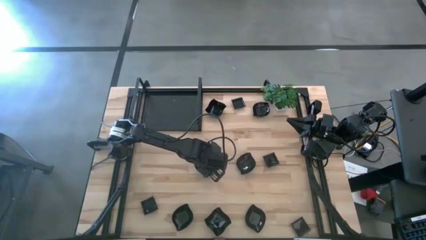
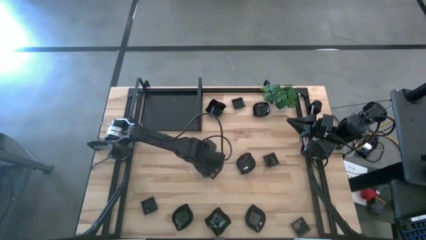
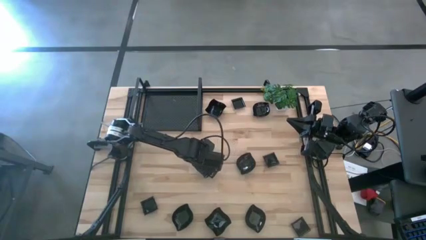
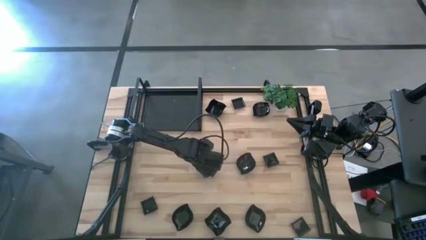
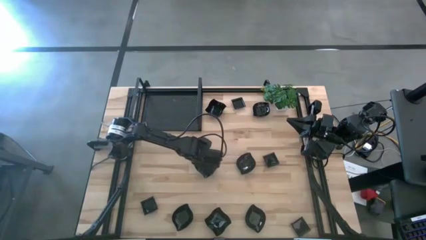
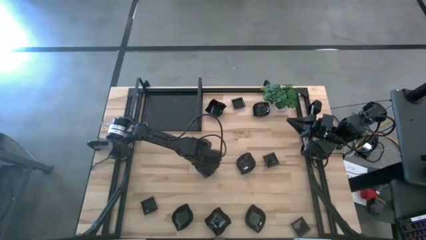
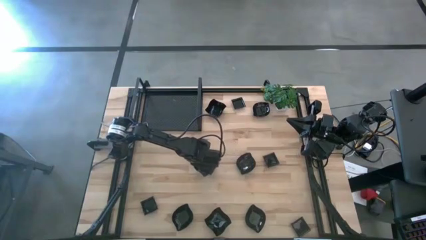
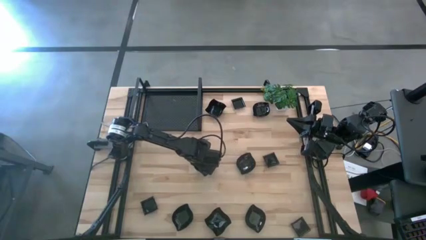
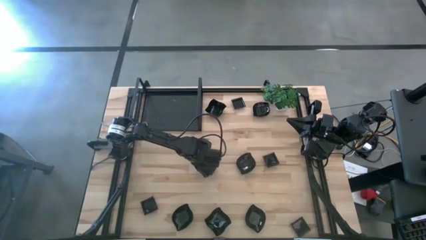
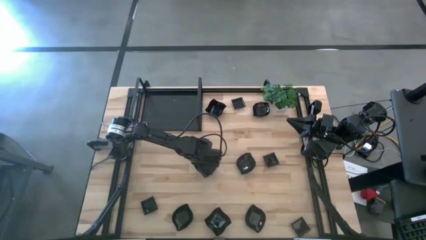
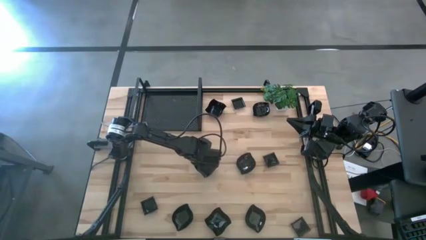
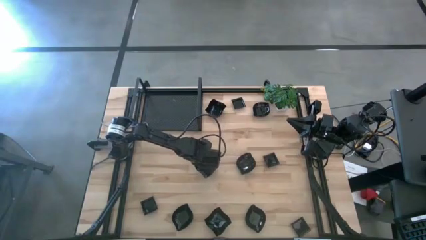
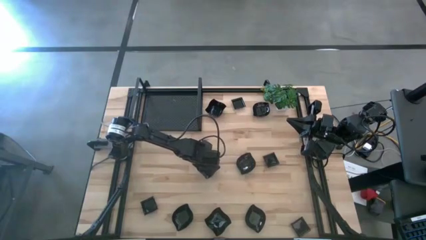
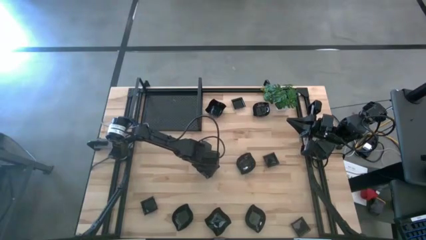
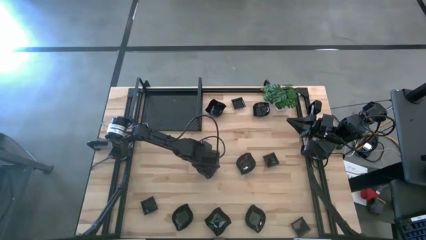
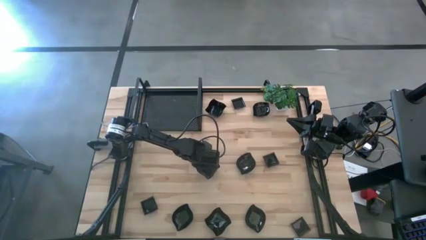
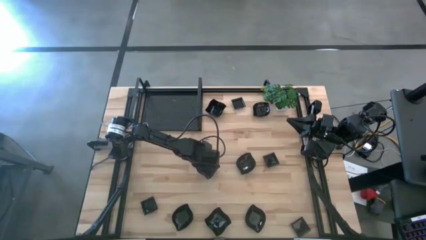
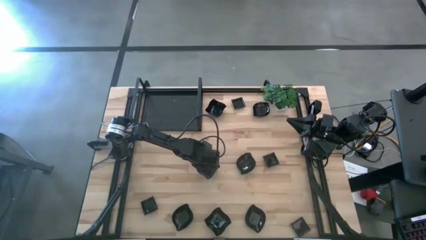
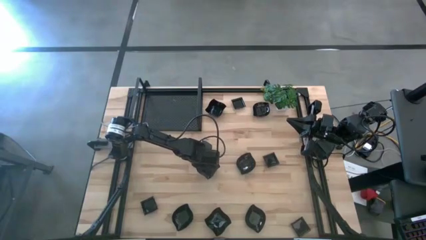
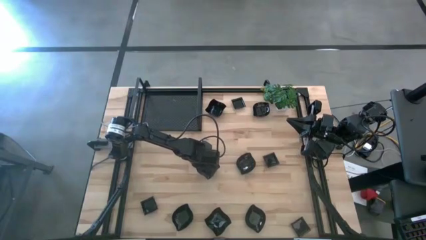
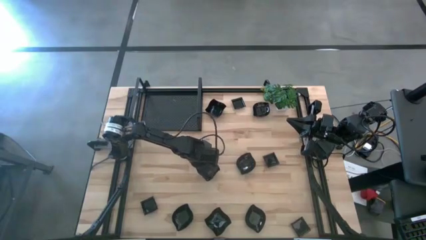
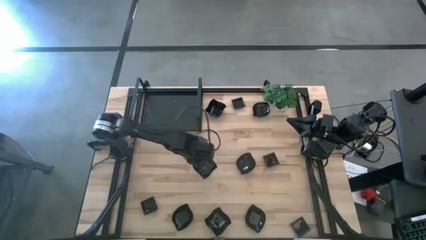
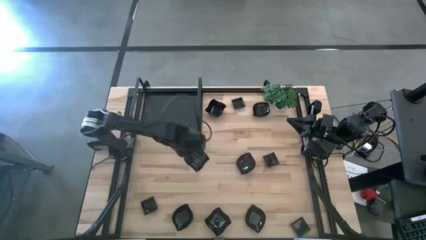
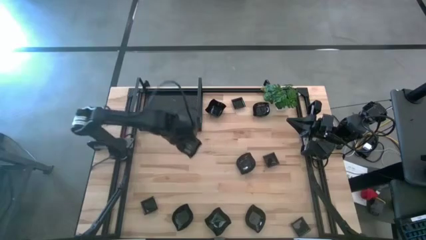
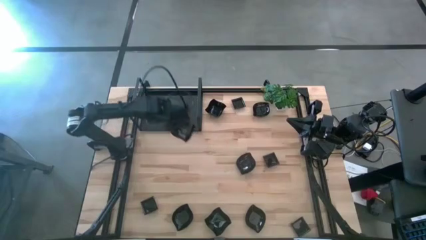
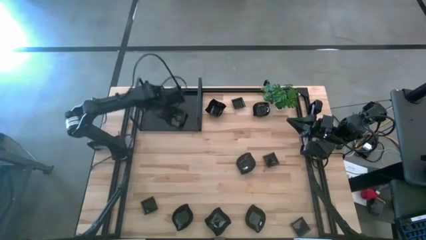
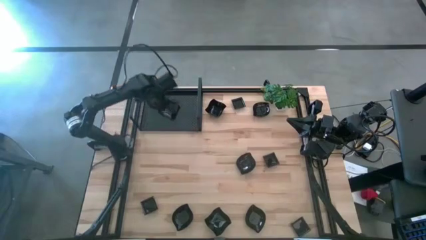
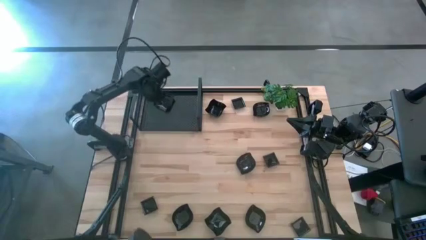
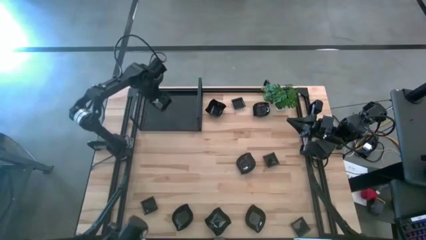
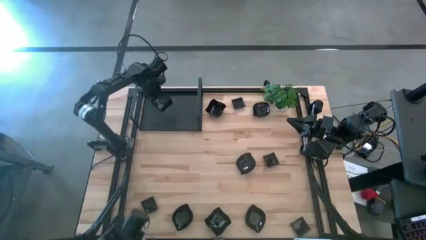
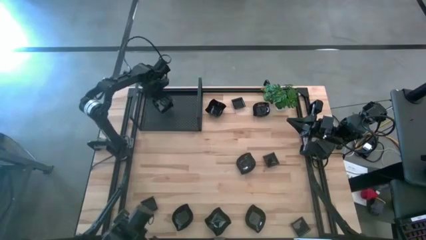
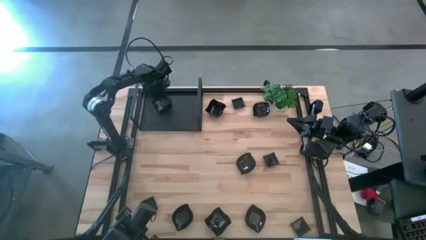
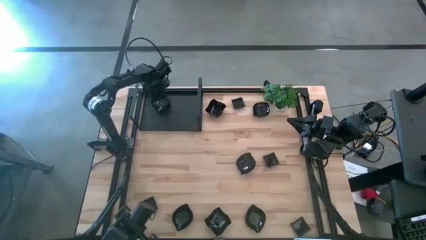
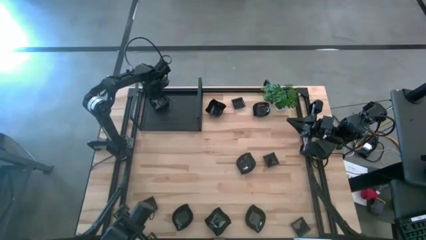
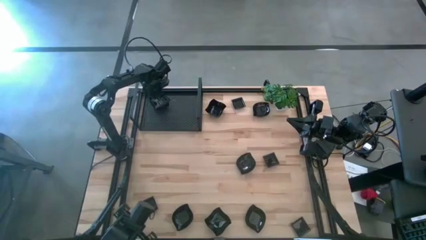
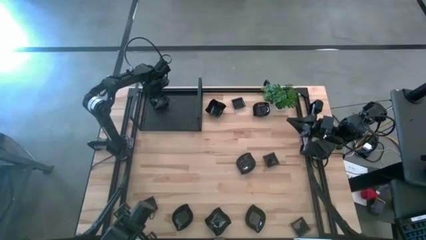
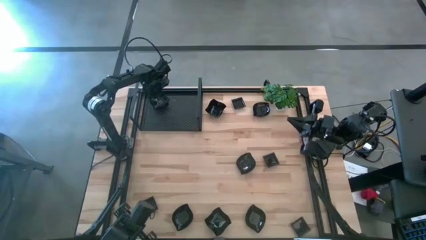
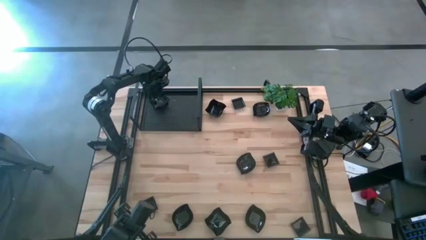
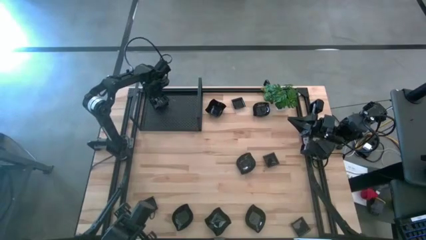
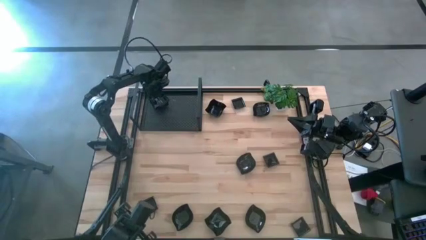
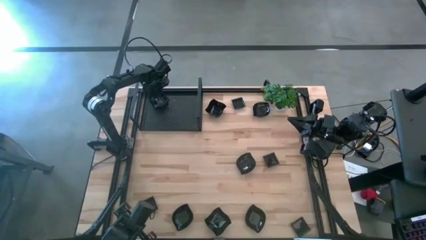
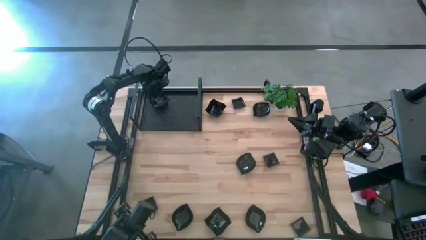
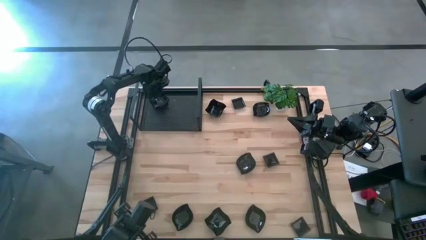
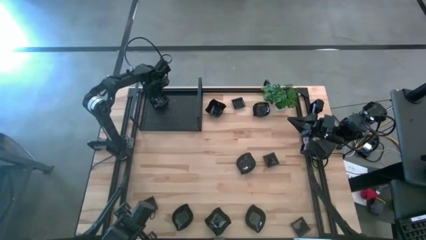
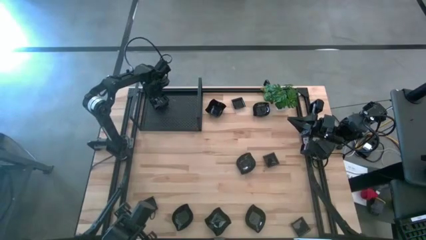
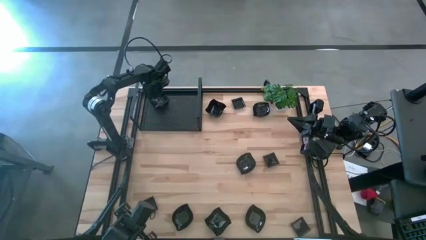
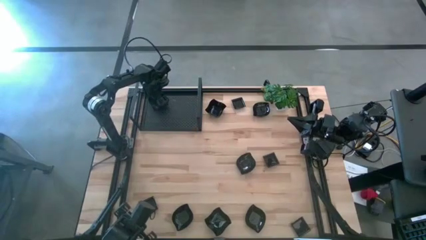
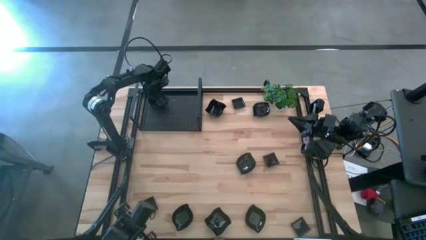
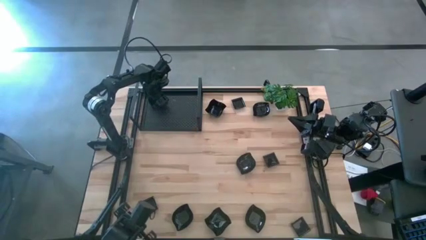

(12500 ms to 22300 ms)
Task: Pick & Place Mini shaped plates
Put the stacked black distorted square plates on the shelf

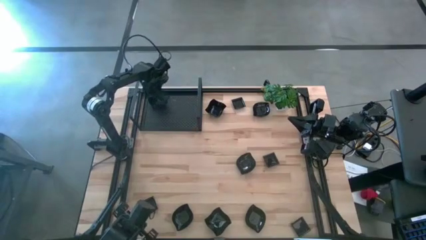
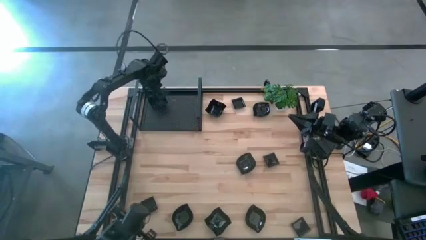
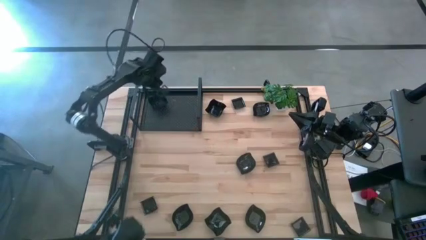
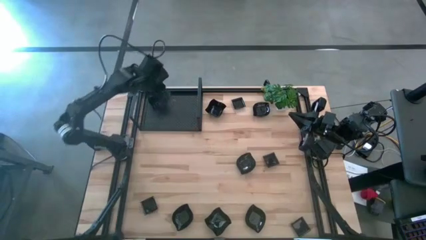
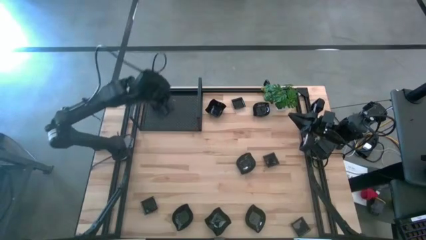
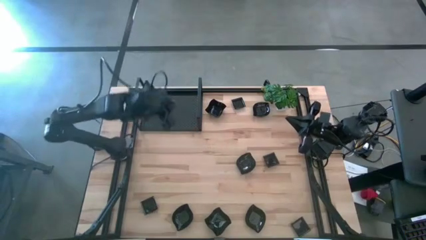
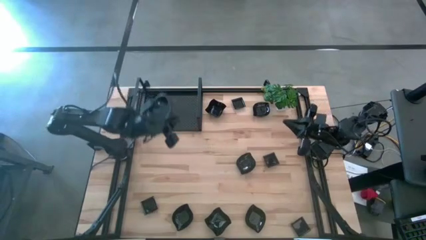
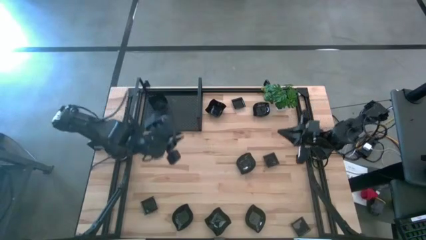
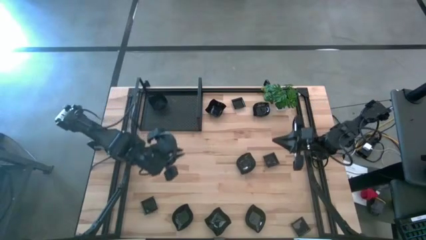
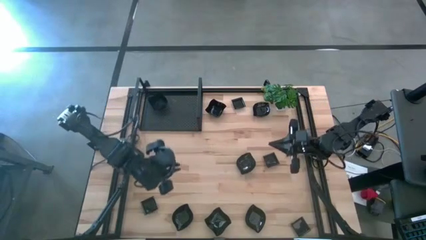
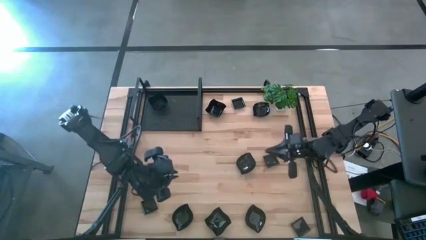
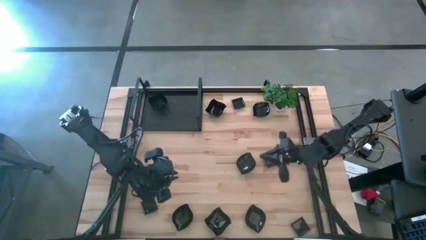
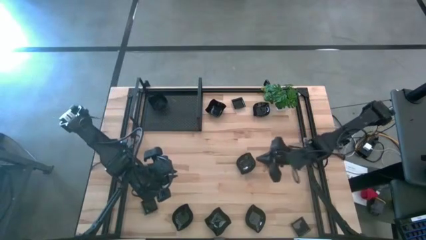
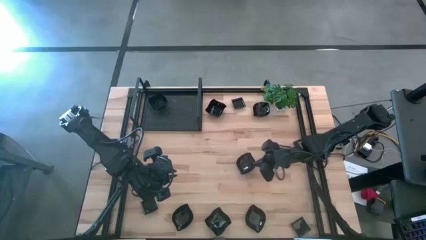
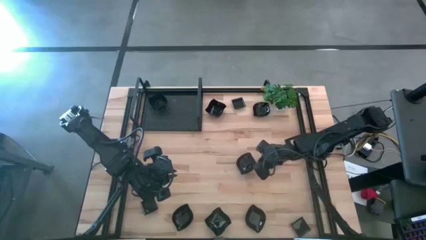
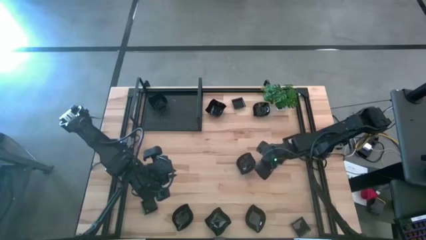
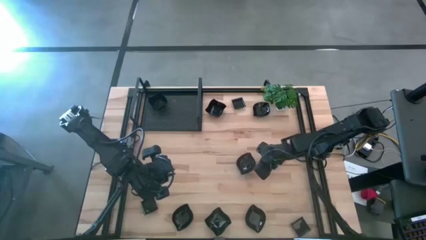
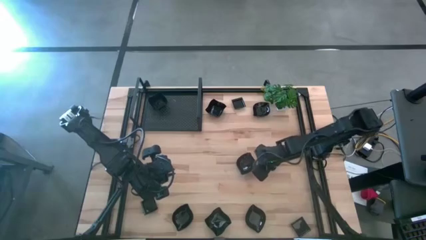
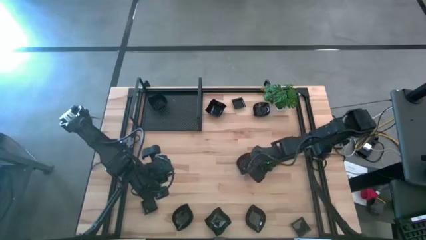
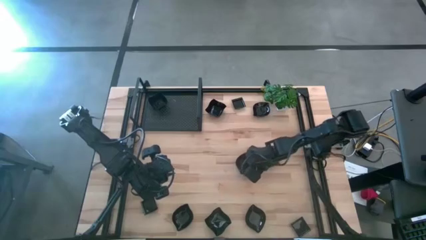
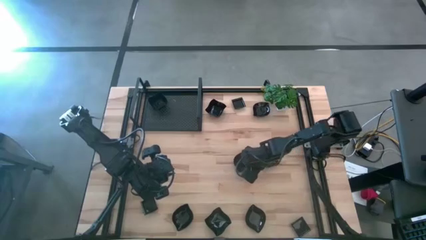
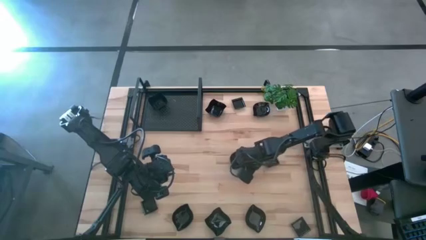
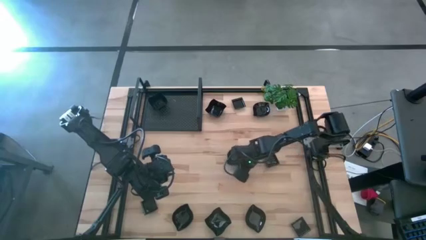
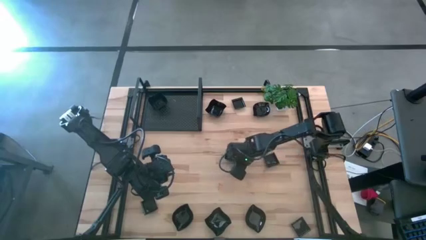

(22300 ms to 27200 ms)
Adjust the black leaf shaped plate

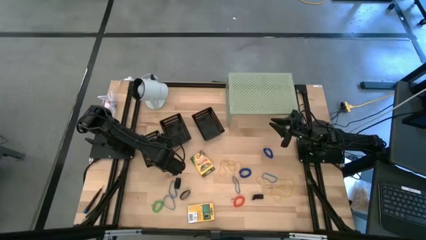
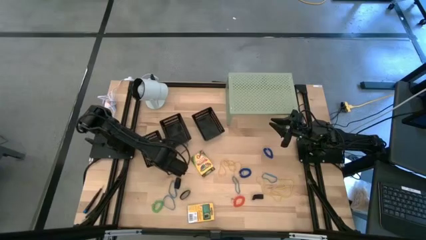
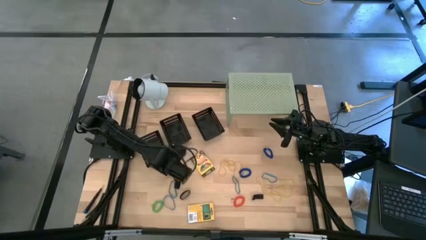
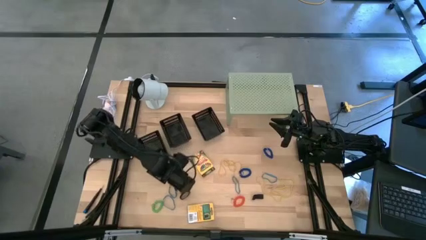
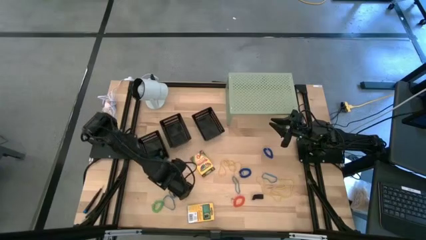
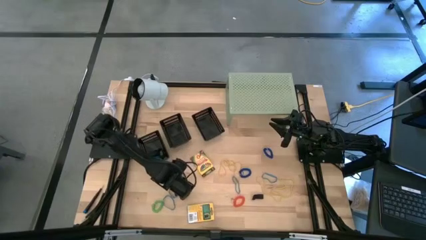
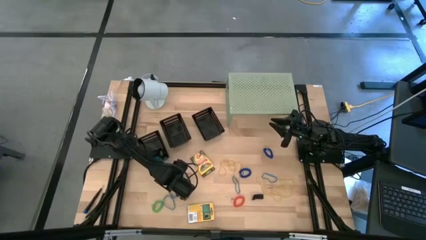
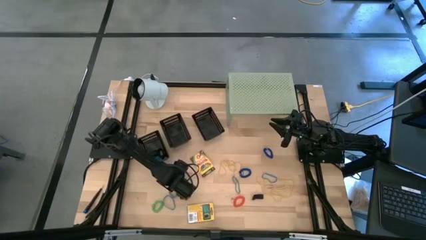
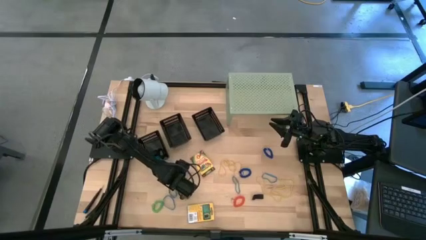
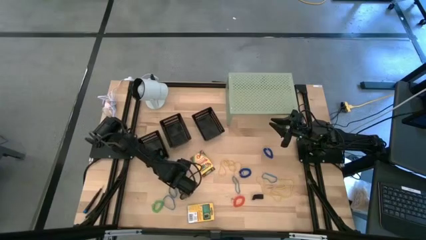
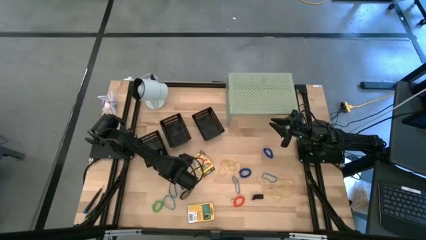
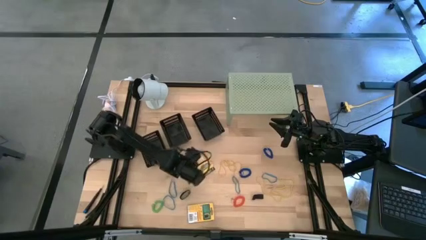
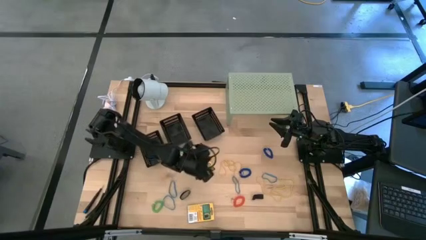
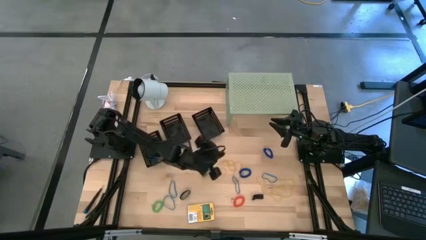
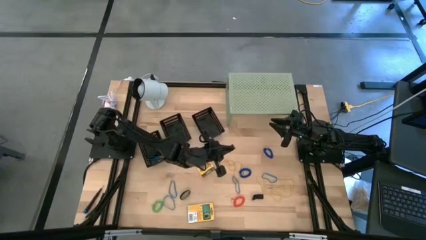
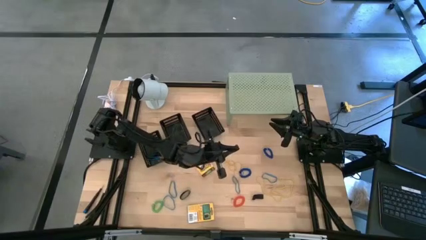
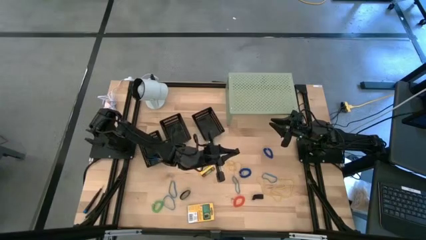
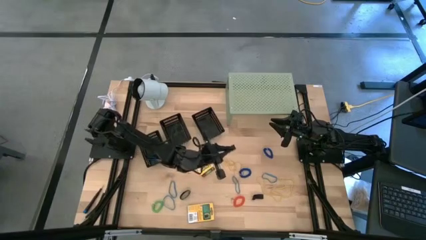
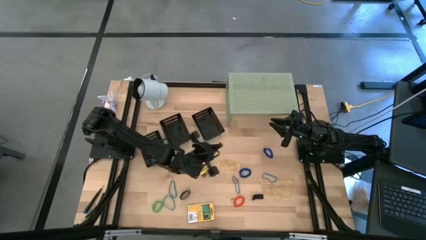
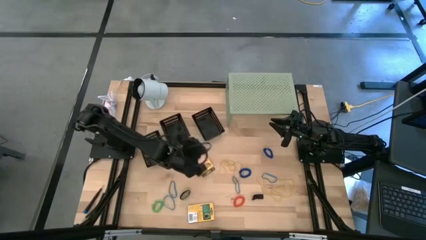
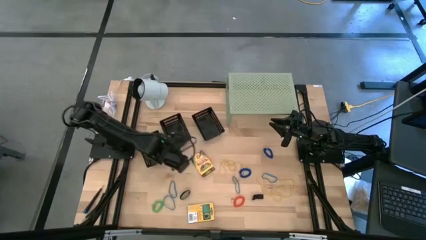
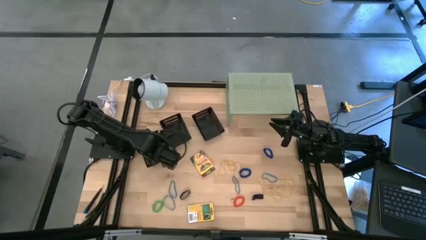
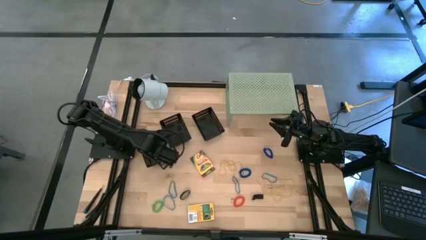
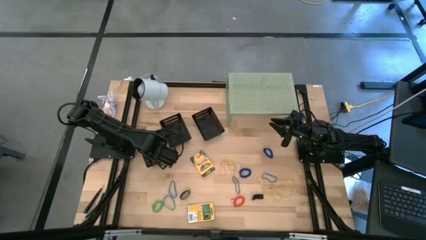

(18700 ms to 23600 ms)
Task: Pick & Place Office Desk Supplies
Put the black rubber band into the left black basket
